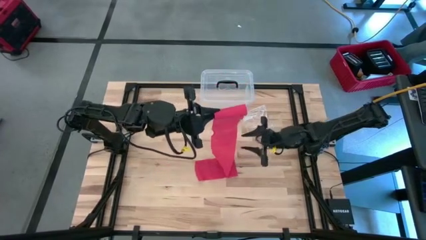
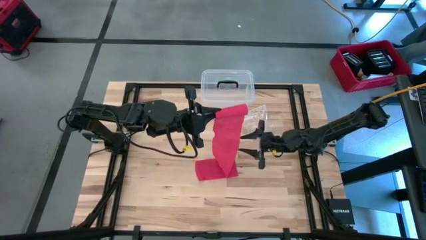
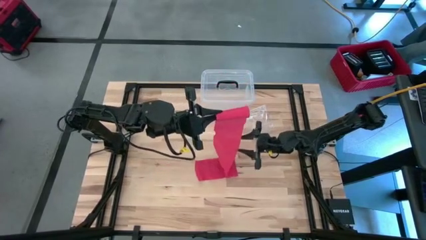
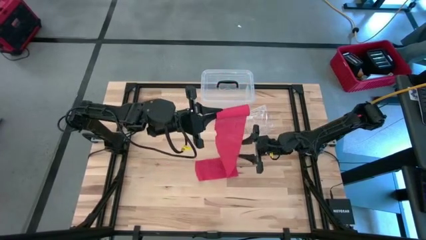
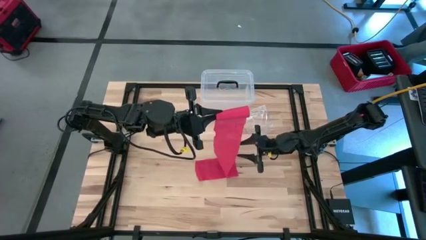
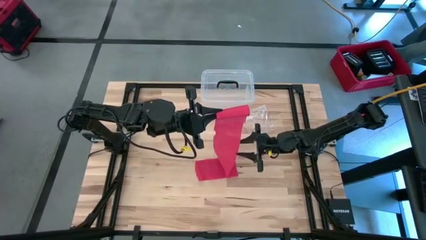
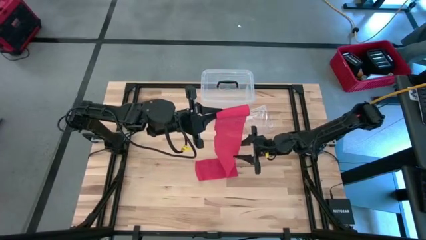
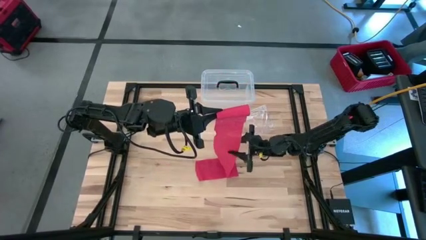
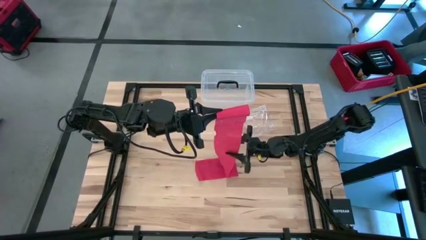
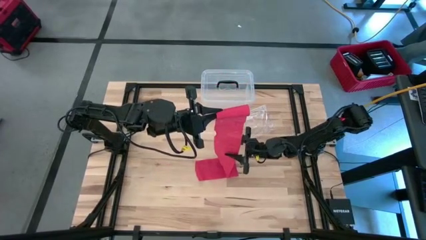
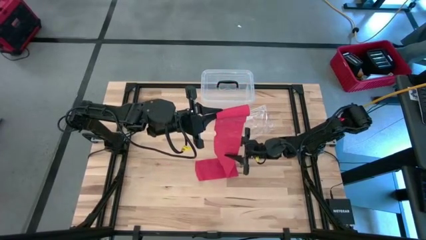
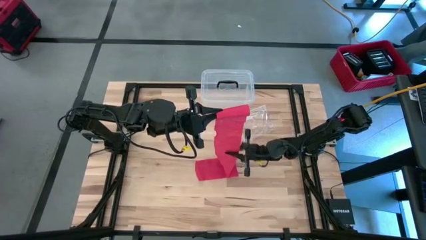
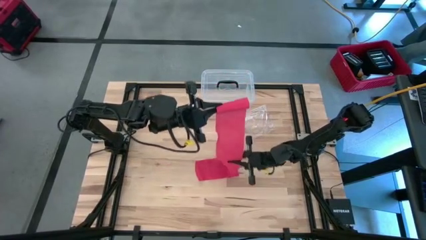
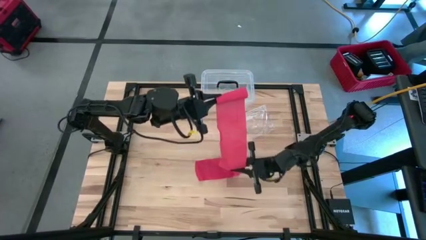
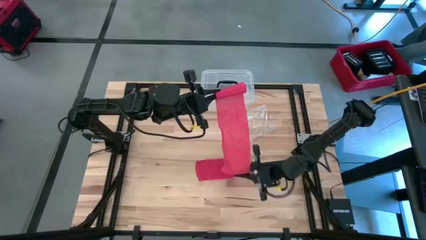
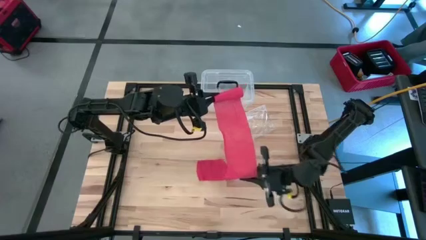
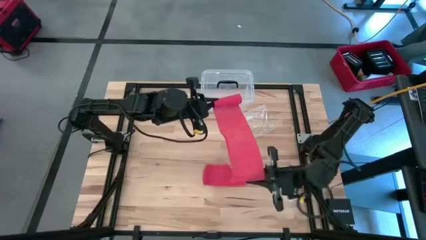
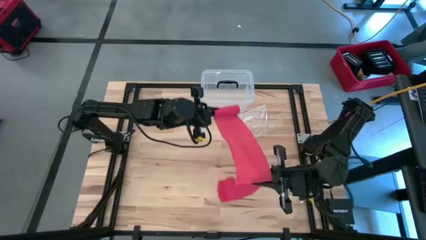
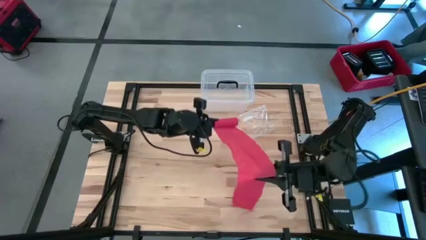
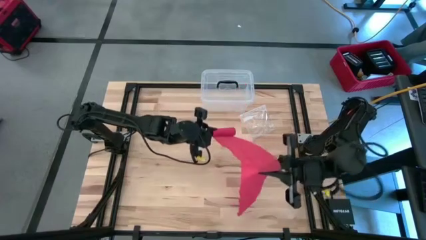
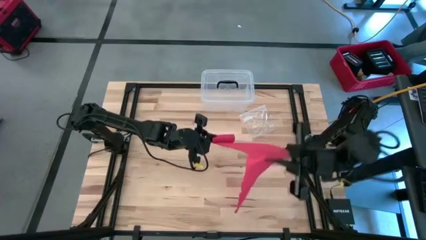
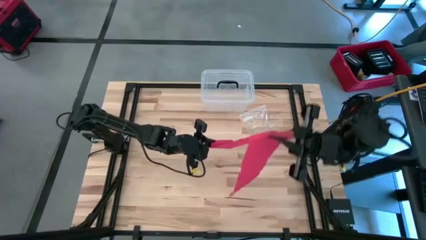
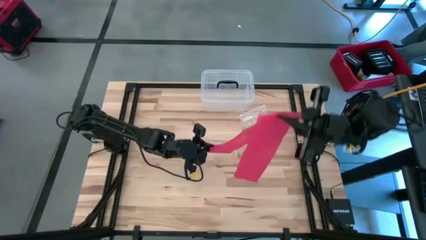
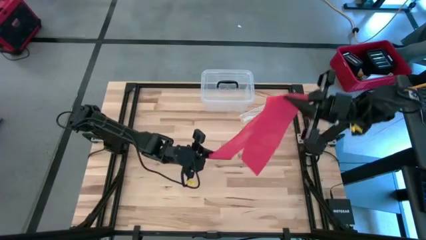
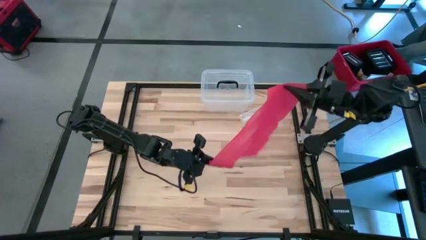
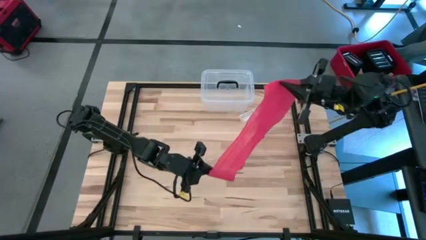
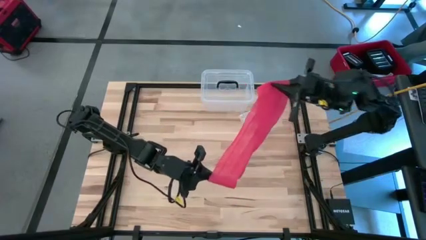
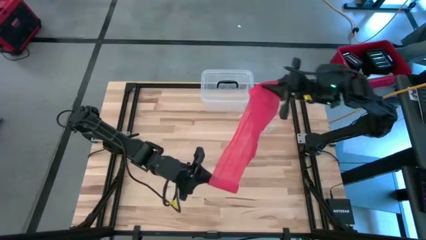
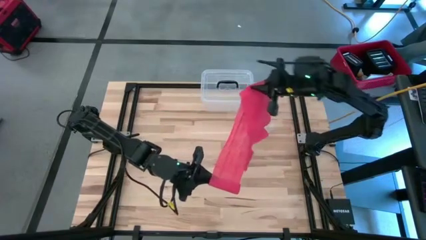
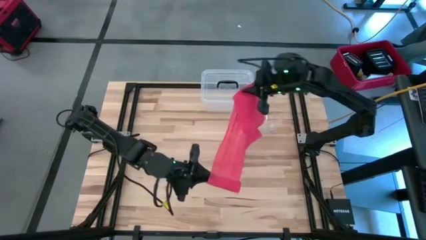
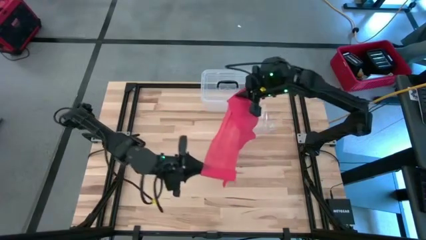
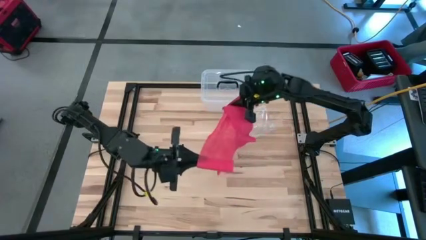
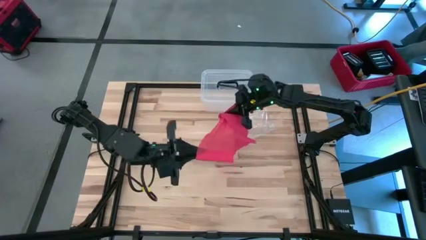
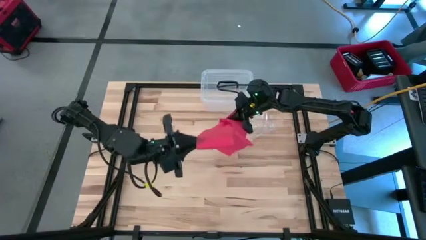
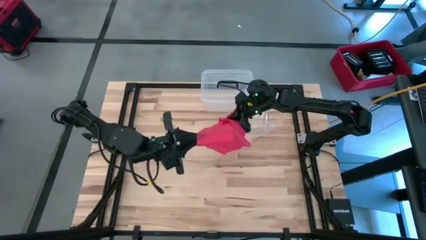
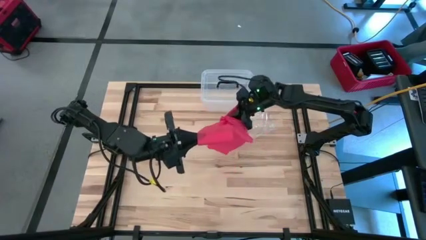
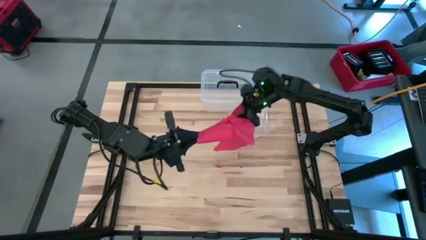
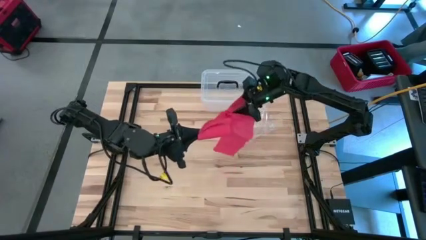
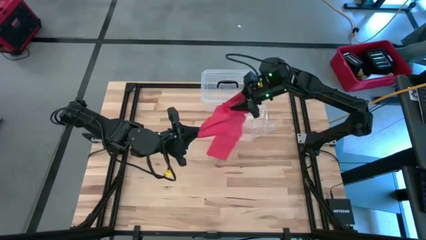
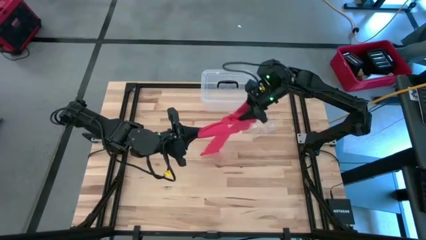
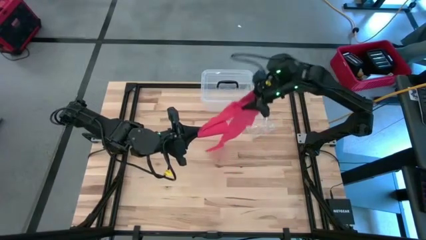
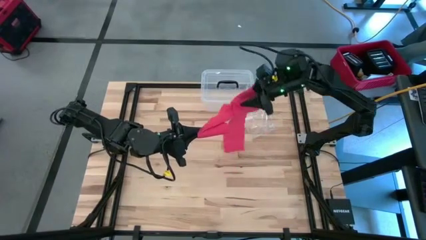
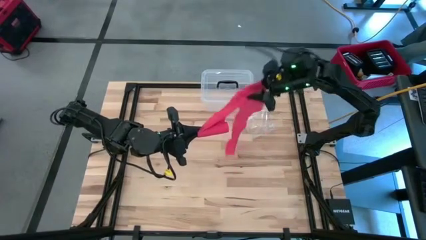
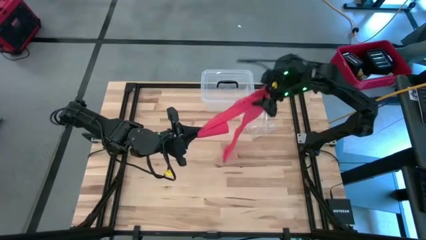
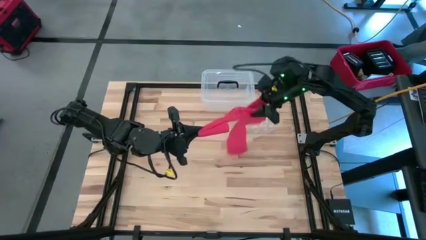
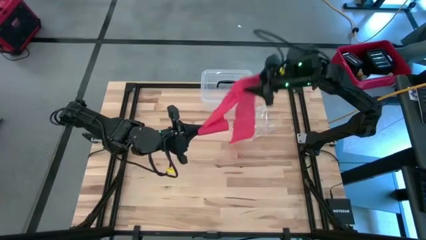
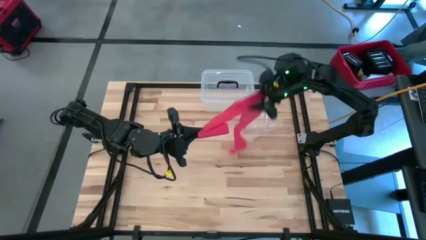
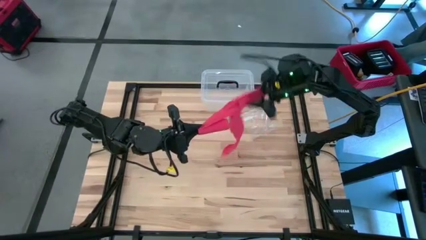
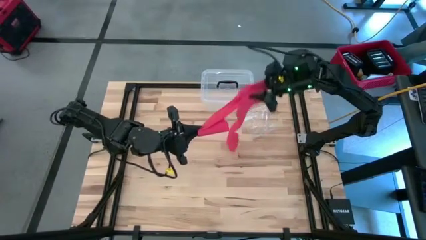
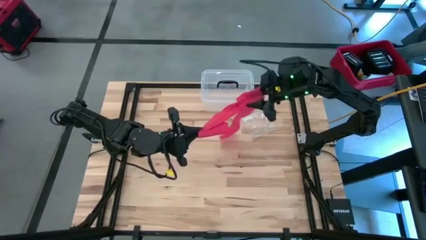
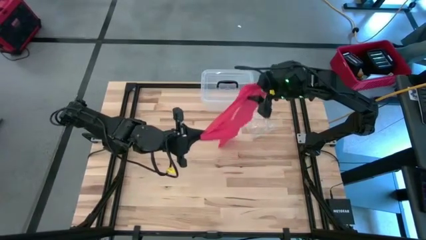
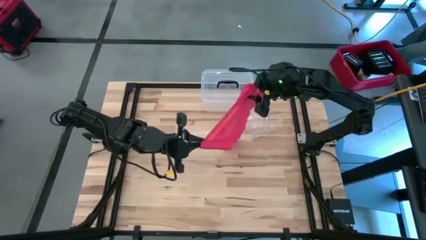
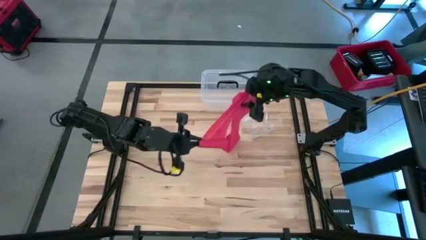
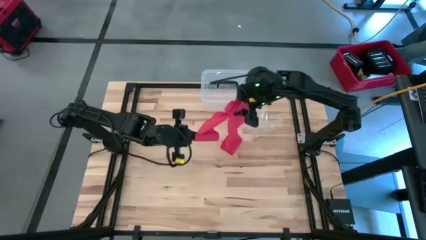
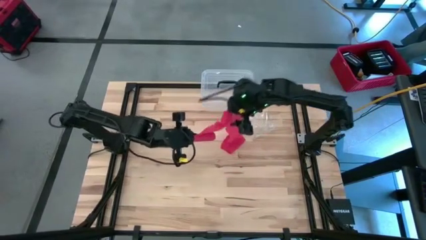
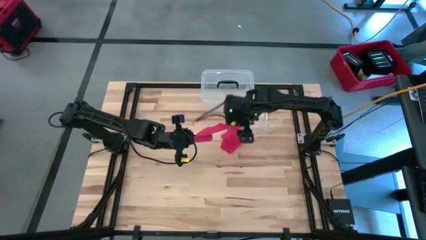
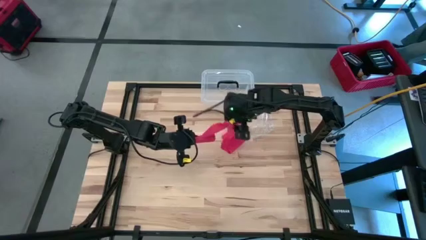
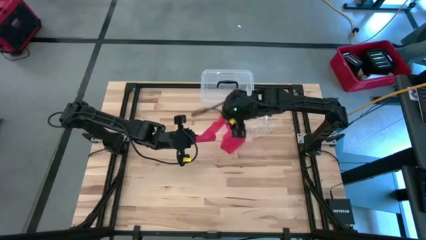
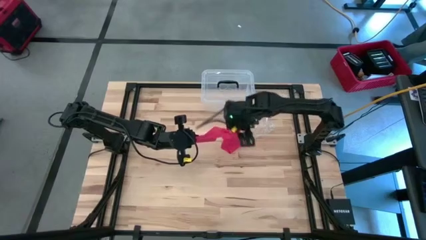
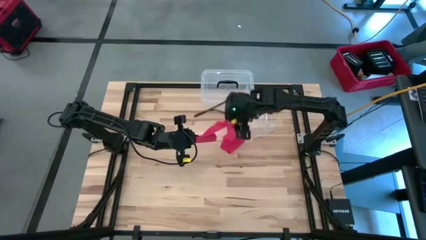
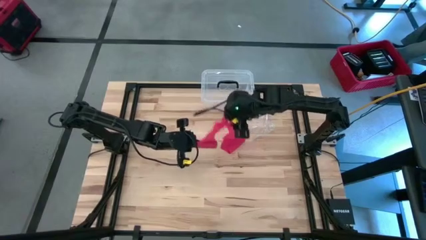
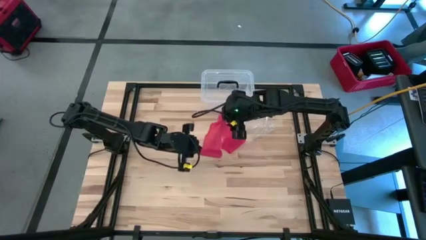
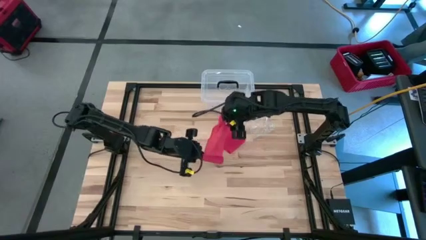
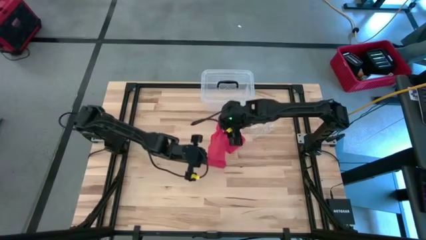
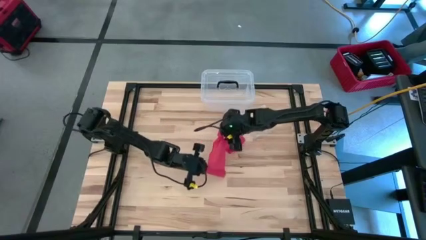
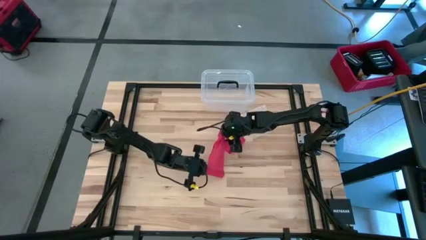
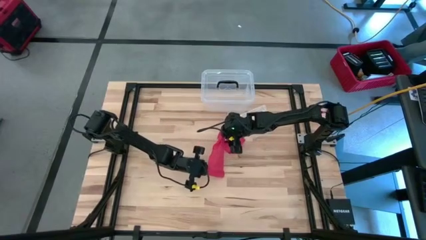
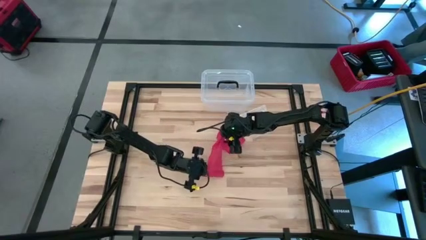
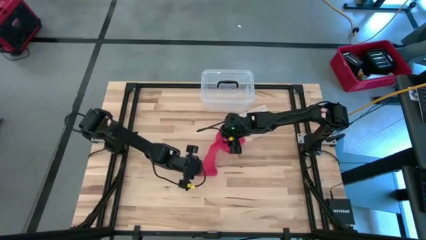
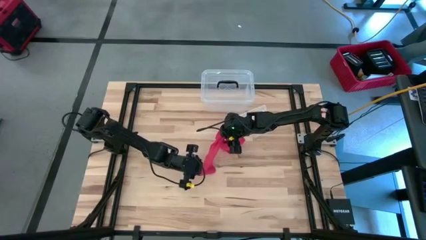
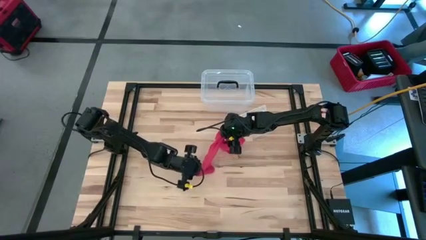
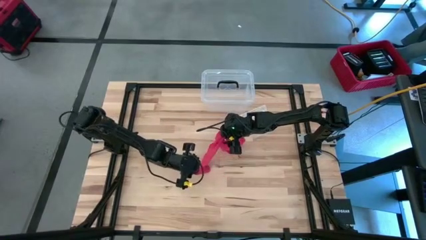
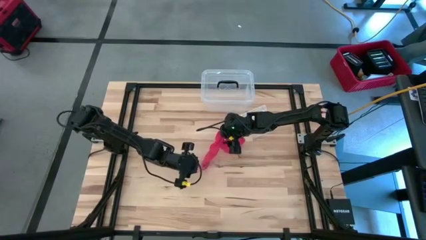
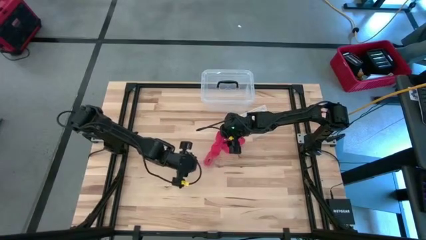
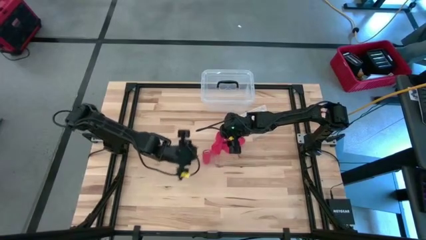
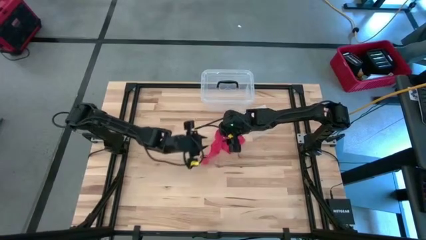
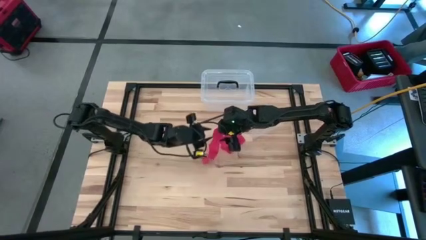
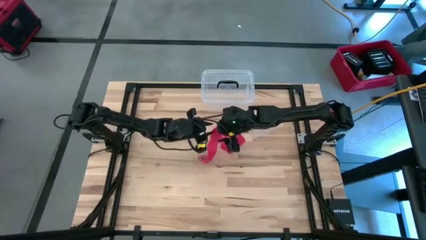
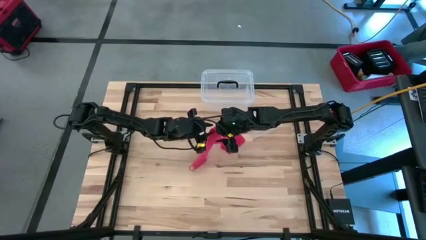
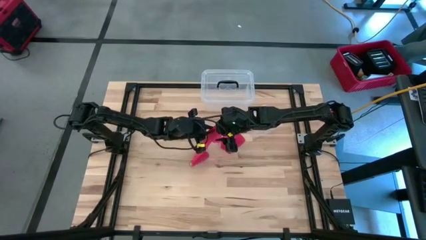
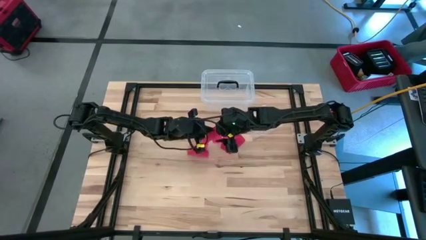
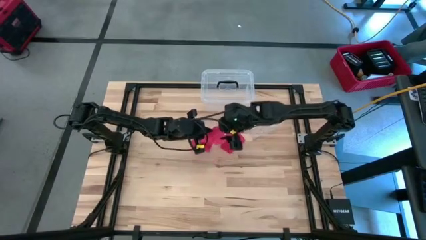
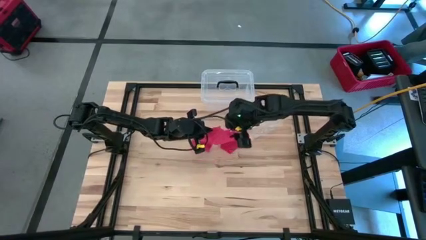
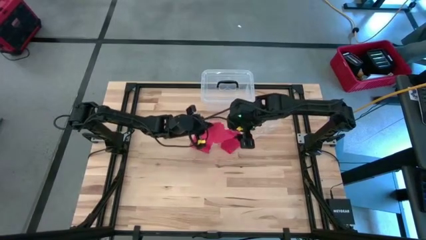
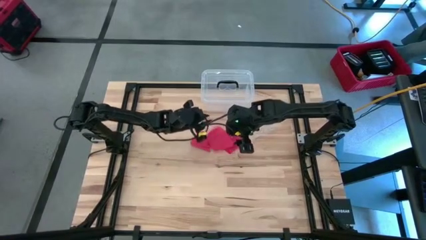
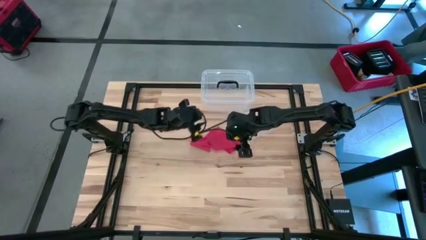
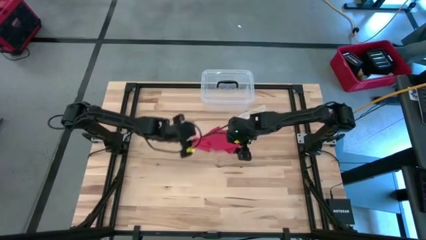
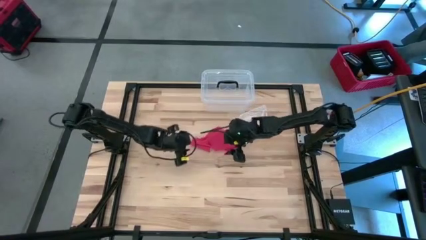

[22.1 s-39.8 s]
Task: Roll bandage
Roll the red bandage
